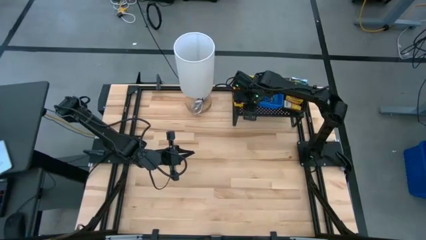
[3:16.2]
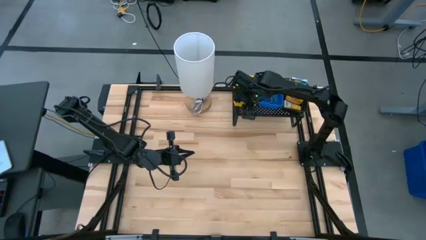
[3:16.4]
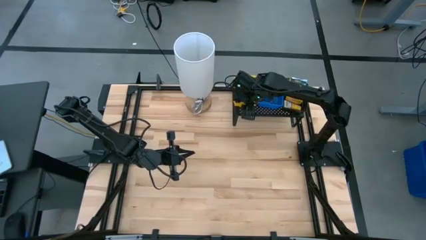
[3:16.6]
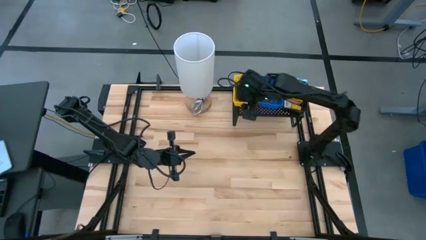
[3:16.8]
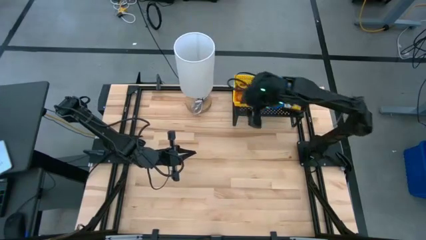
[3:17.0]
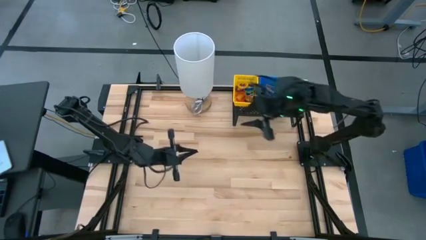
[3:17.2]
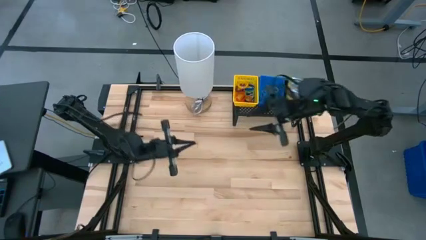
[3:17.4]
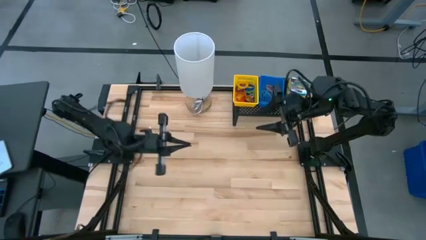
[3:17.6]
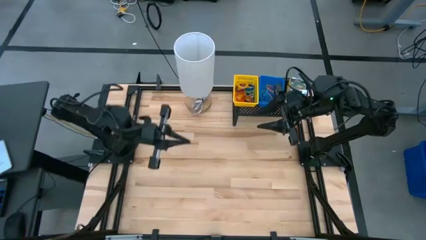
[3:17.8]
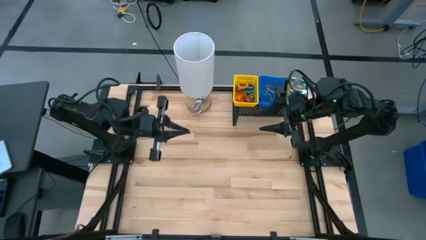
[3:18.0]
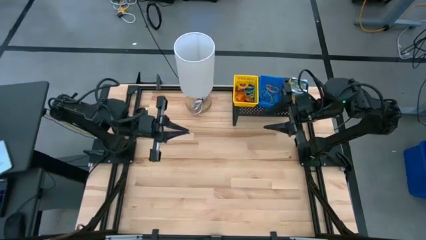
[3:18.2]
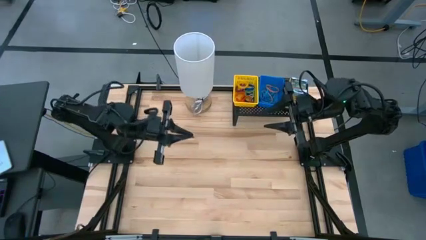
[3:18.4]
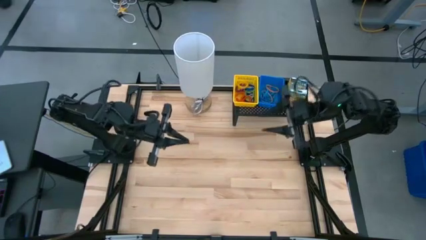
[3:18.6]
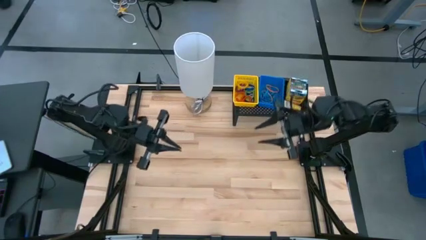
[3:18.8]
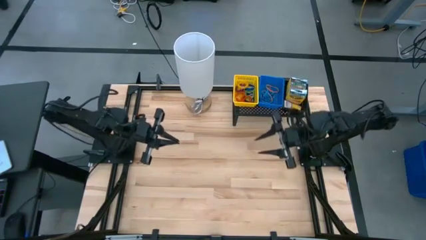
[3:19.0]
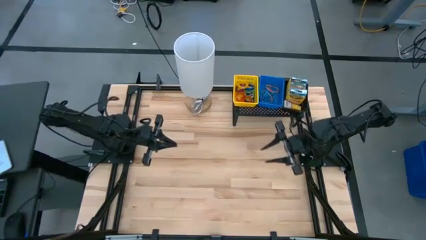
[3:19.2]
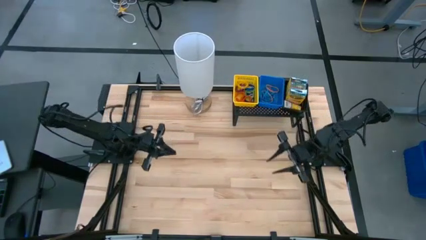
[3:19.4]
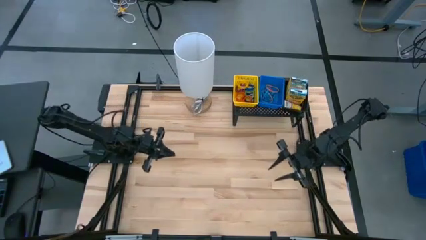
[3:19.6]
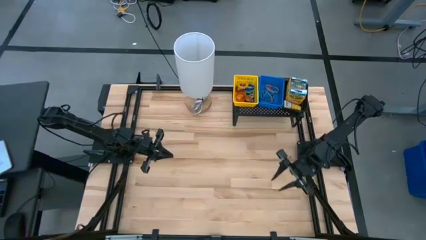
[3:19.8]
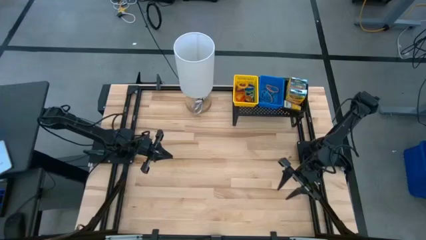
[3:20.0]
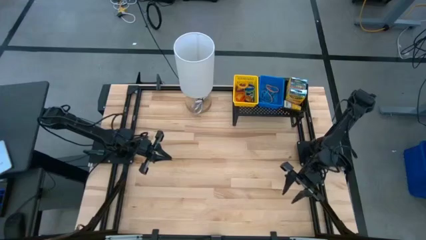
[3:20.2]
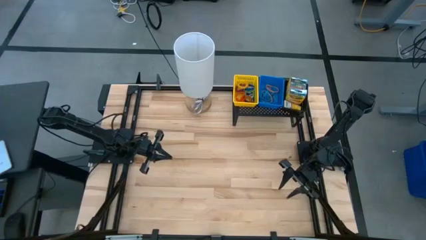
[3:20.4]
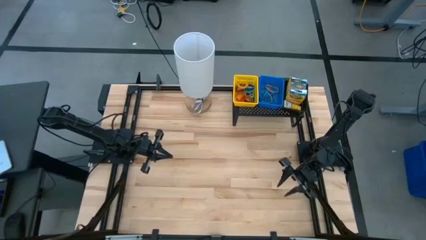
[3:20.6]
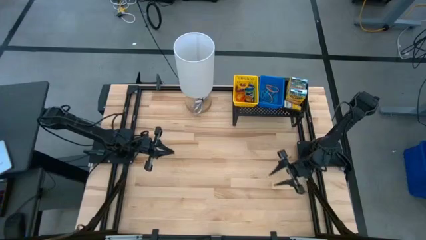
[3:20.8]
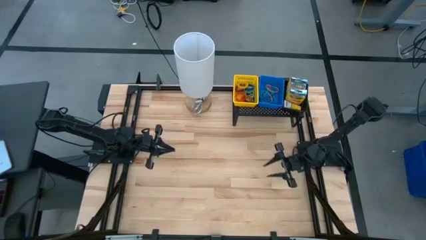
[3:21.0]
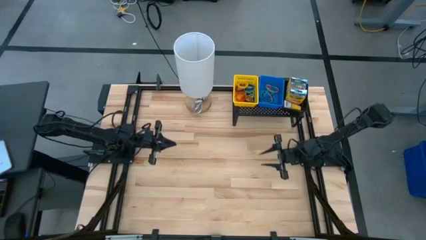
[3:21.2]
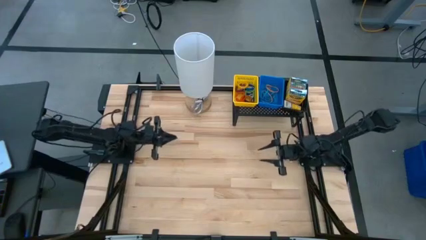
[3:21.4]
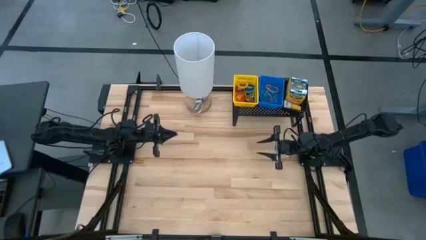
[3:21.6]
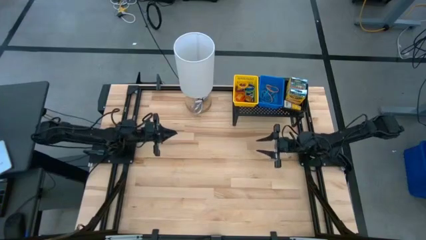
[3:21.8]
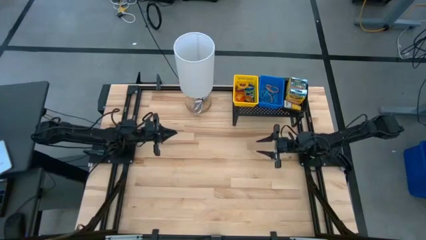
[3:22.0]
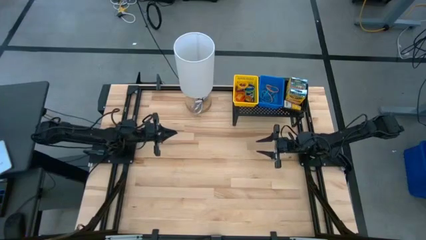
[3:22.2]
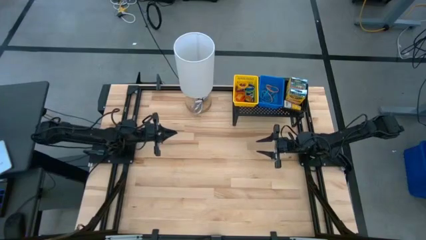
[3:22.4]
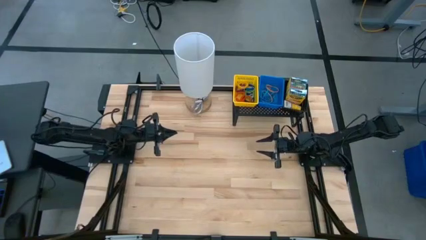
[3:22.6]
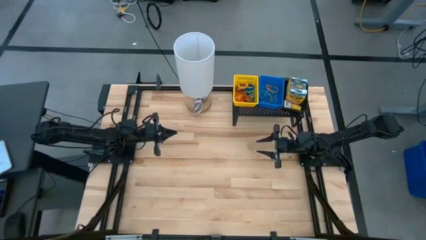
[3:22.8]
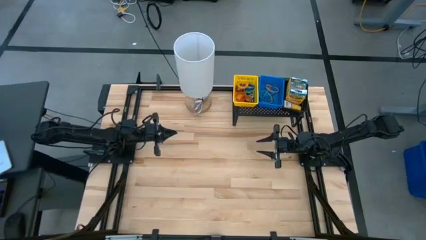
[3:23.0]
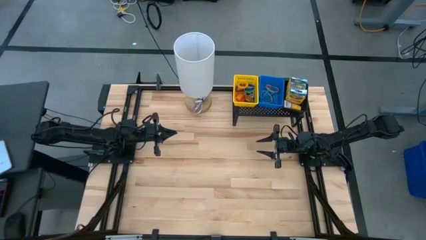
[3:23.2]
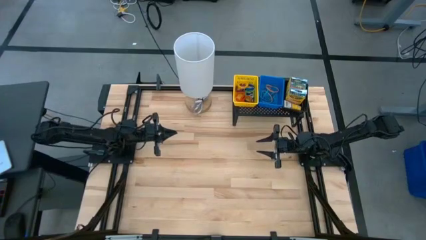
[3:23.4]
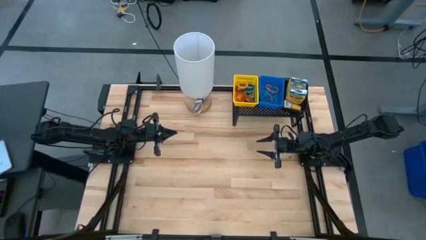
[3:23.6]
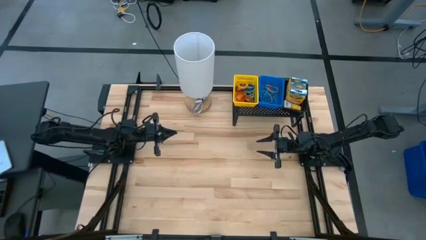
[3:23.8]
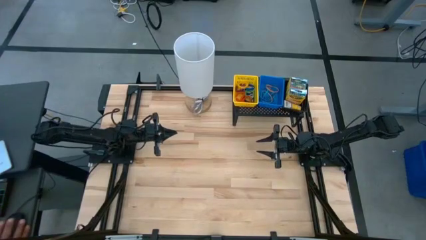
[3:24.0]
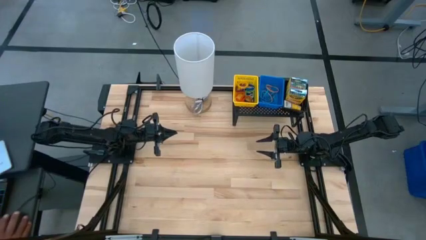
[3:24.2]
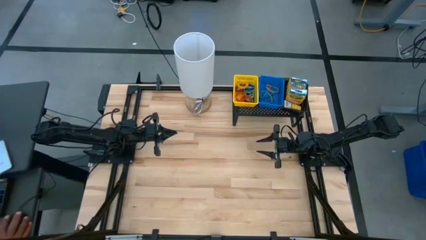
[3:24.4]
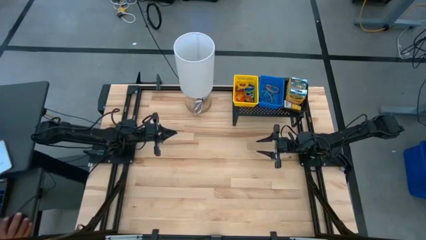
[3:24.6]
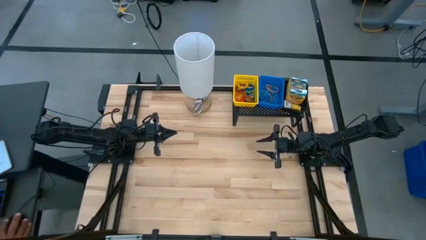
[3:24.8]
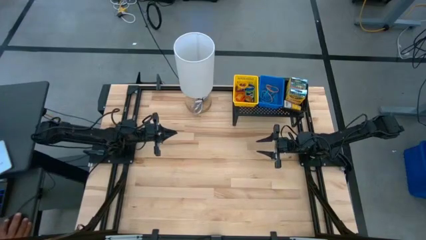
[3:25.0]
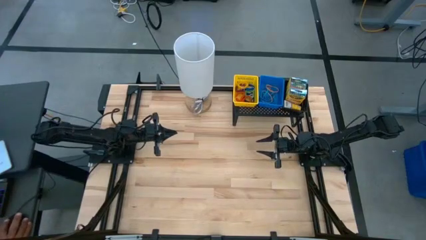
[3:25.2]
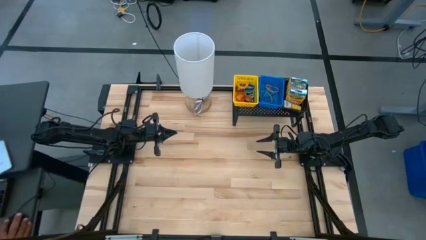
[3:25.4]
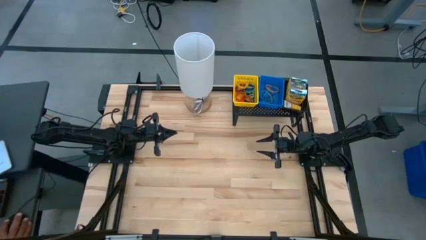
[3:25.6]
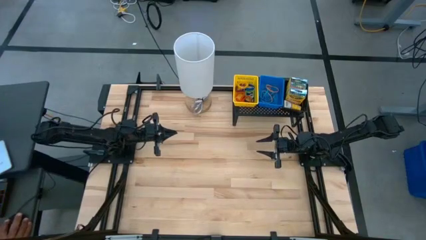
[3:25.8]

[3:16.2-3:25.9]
Task: Pick & Place Office Desk Supplies
Return to Home Position

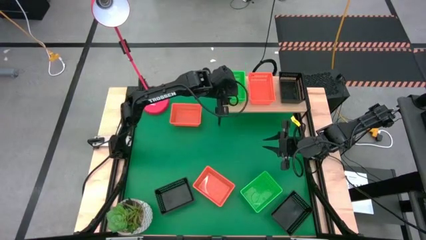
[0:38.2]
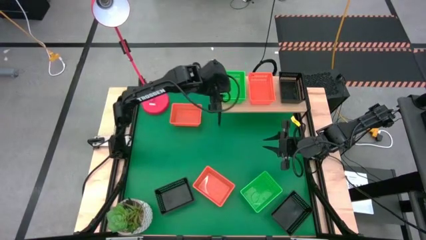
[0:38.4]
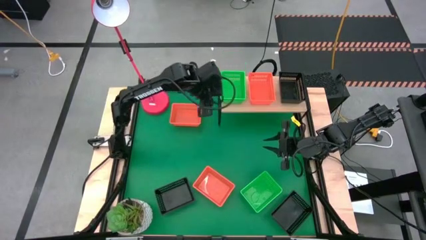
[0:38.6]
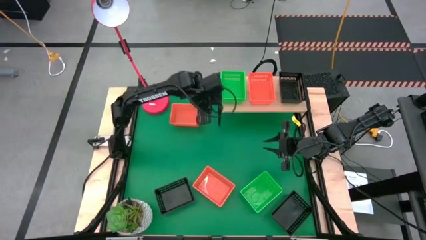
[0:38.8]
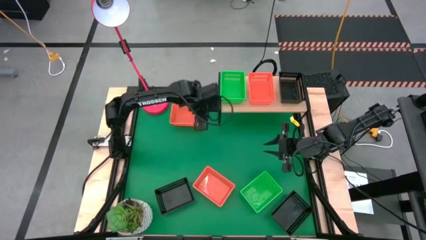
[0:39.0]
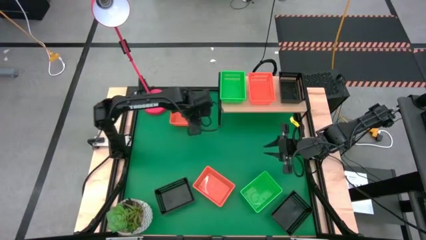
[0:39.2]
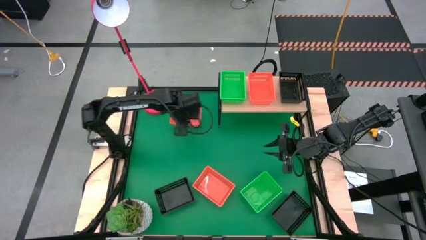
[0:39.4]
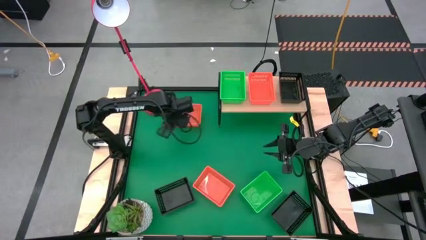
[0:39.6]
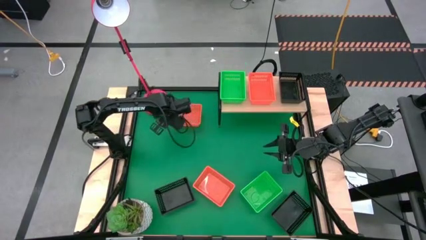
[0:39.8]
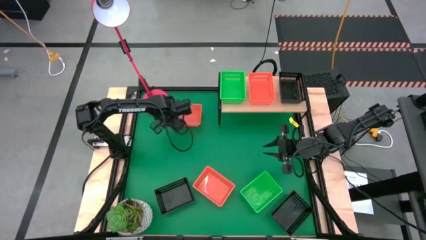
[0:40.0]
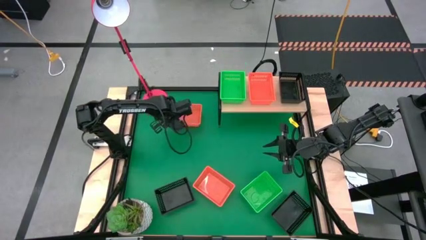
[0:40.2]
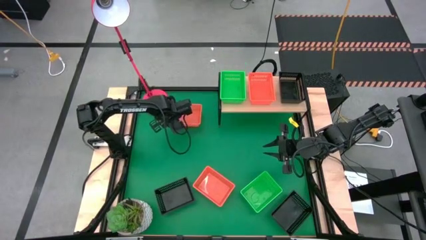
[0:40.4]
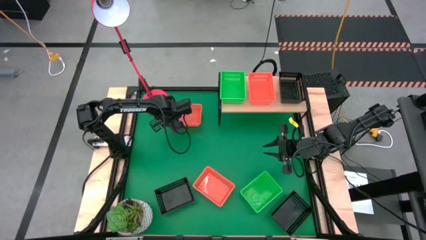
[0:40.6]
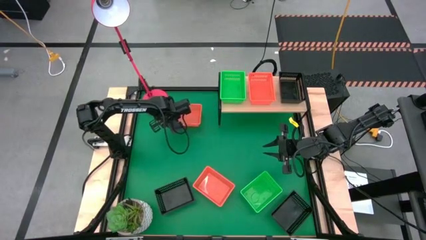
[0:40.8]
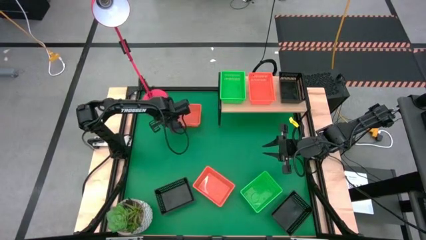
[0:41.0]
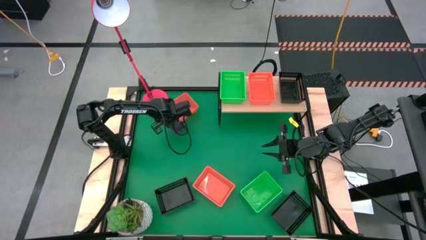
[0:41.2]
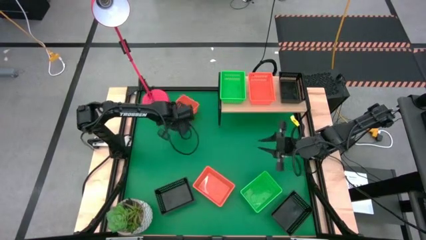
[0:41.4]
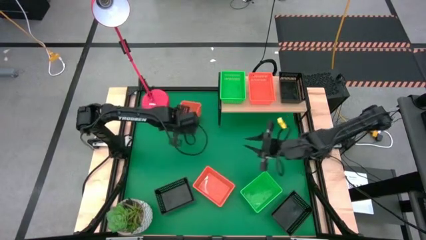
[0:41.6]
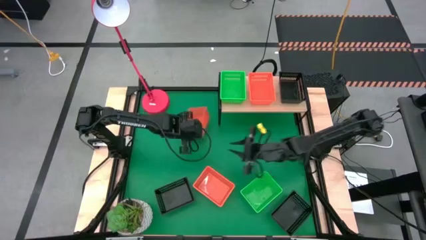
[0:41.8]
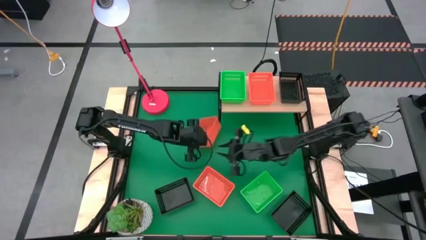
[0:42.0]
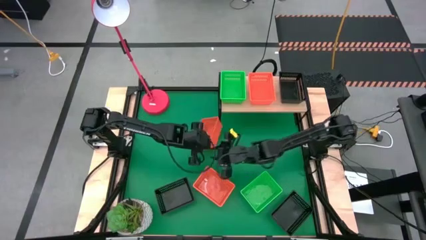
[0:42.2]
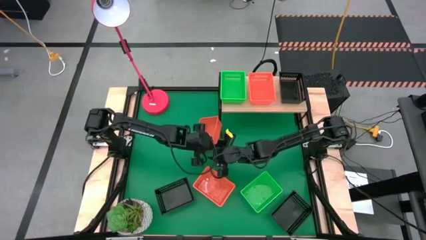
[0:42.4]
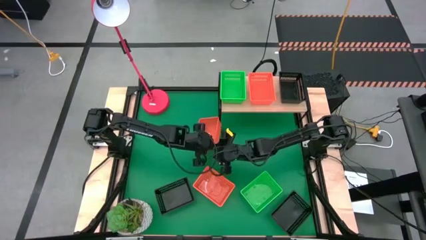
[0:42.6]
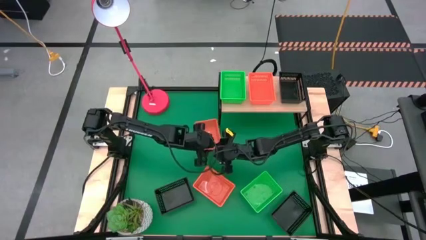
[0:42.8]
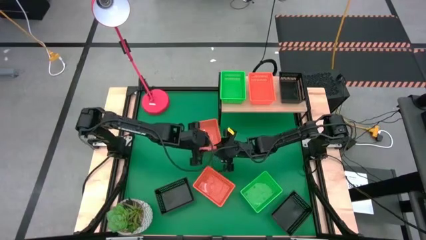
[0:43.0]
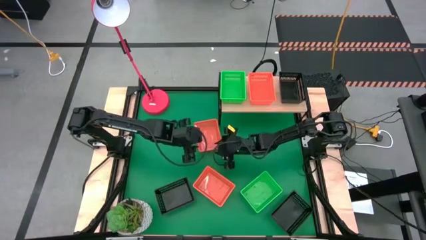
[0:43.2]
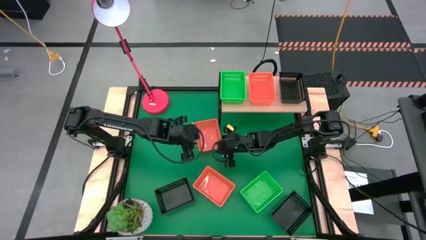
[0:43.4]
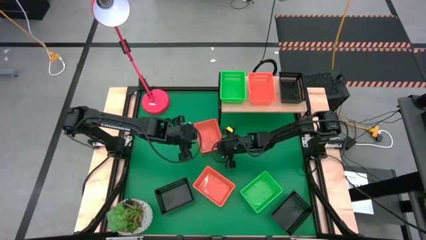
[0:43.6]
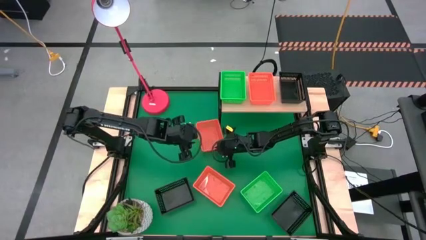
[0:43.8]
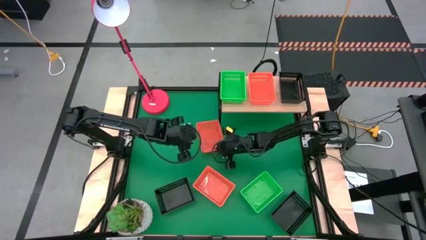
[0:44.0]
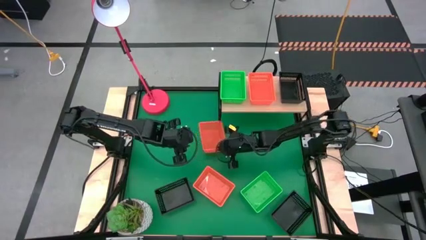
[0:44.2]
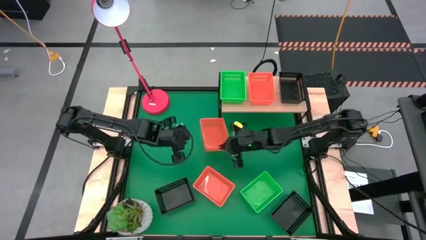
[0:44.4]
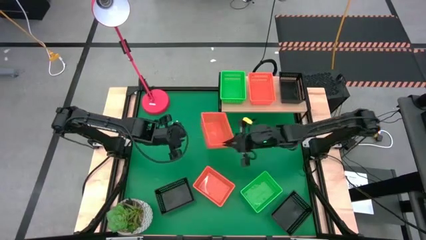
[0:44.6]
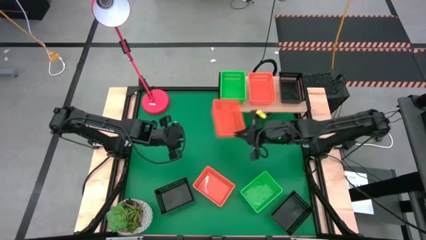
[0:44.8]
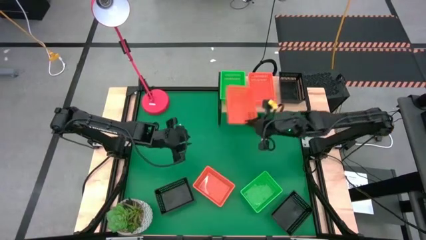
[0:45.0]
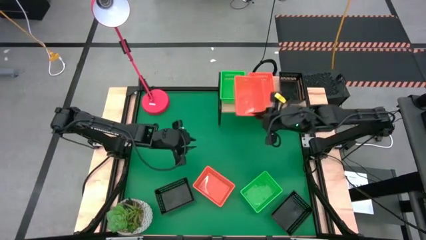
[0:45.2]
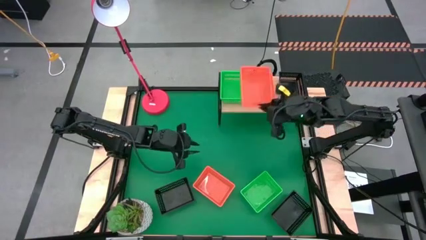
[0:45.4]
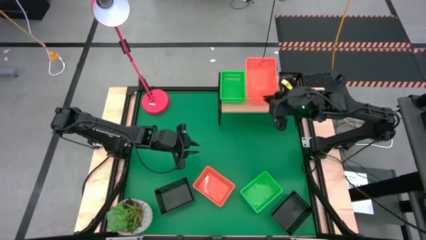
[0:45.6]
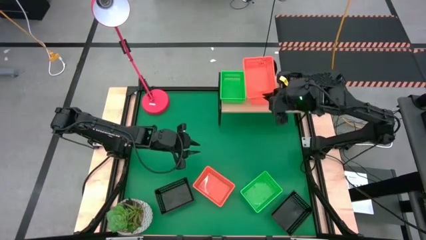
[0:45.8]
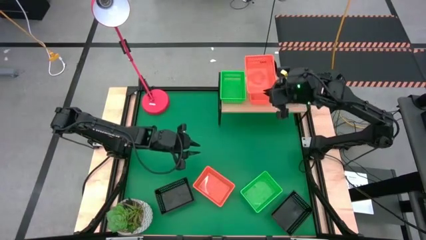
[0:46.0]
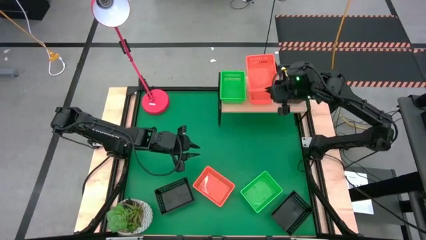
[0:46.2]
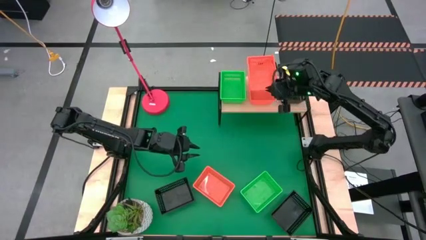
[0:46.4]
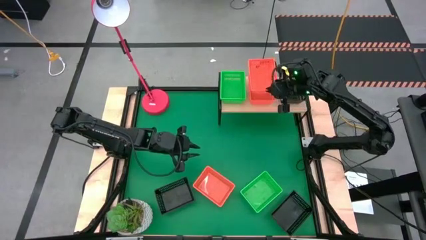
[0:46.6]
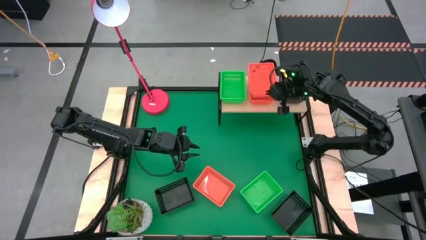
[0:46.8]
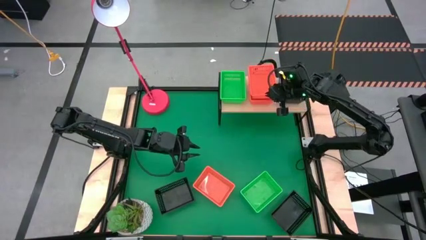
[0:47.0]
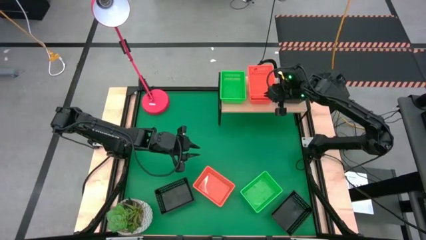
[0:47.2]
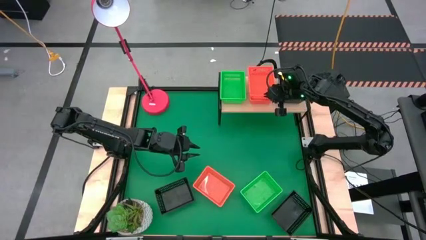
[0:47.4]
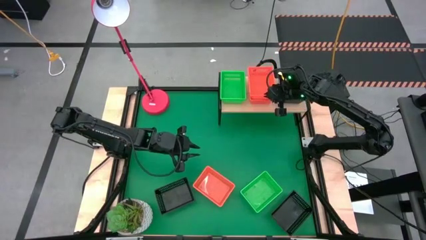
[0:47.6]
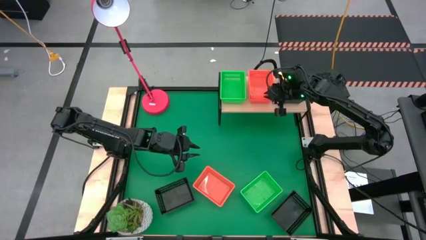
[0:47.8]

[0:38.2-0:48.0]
Task: Stack baskets on shelf by color
Stack the top orange basket on top of the orange basket on the shelf
